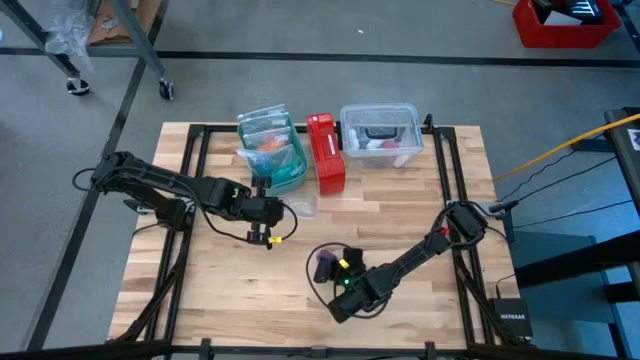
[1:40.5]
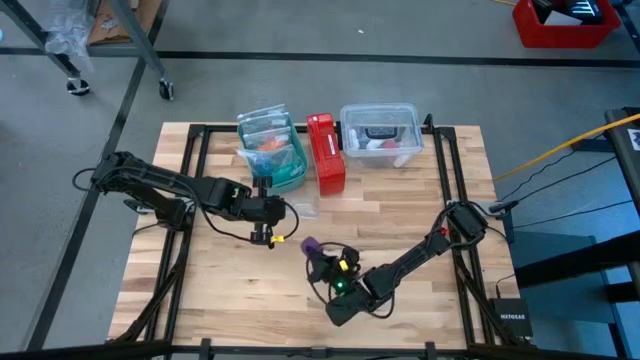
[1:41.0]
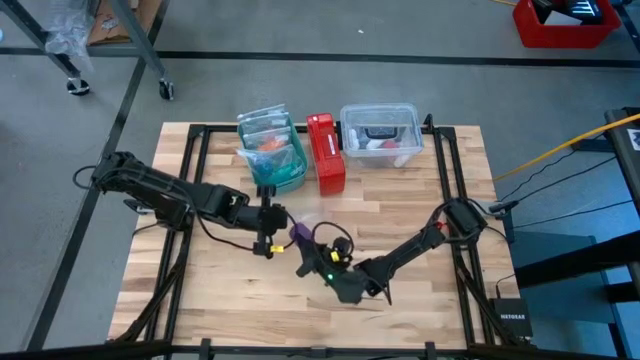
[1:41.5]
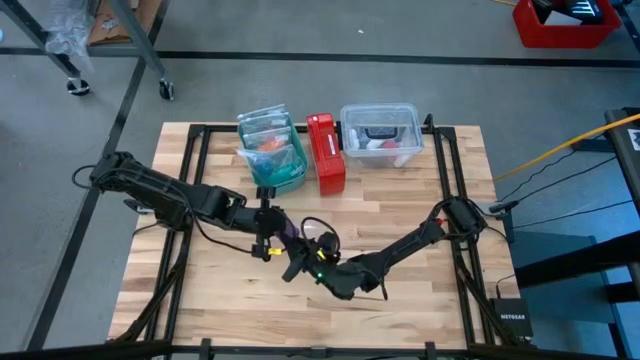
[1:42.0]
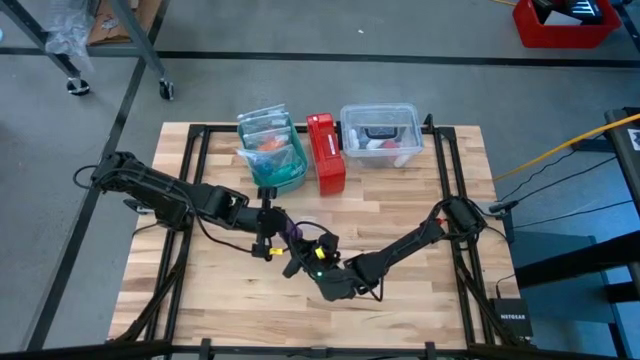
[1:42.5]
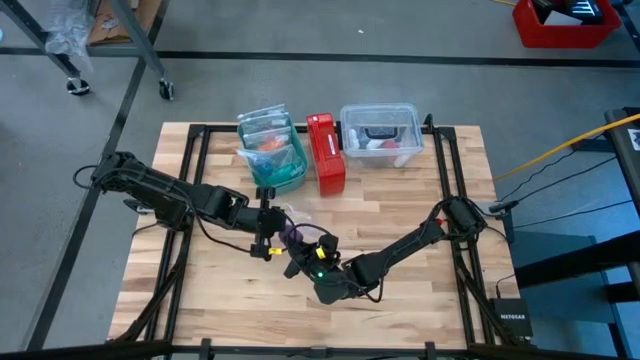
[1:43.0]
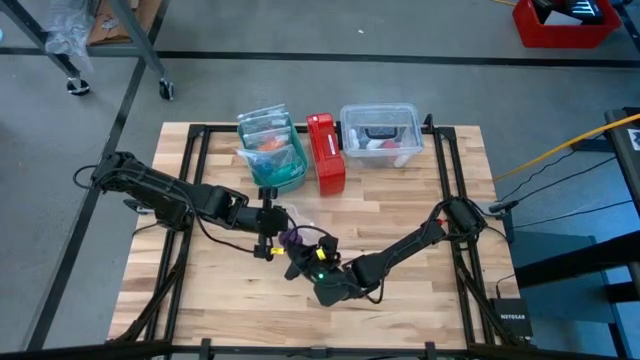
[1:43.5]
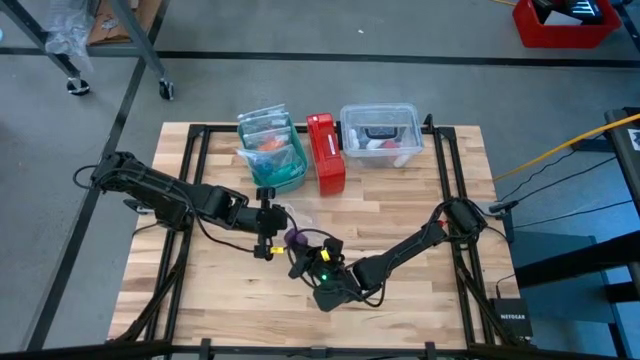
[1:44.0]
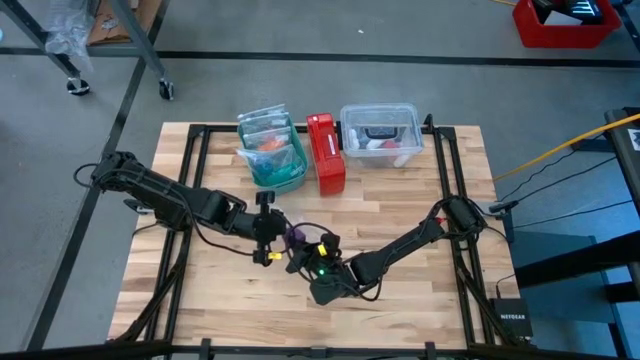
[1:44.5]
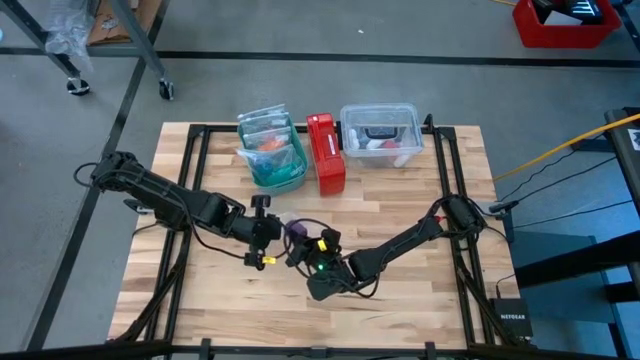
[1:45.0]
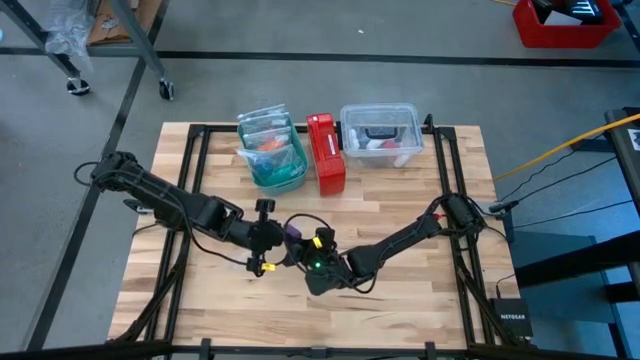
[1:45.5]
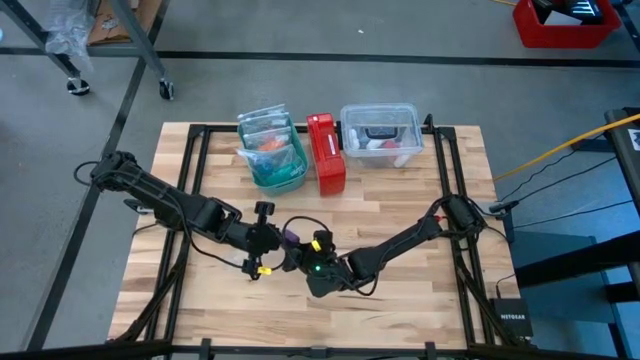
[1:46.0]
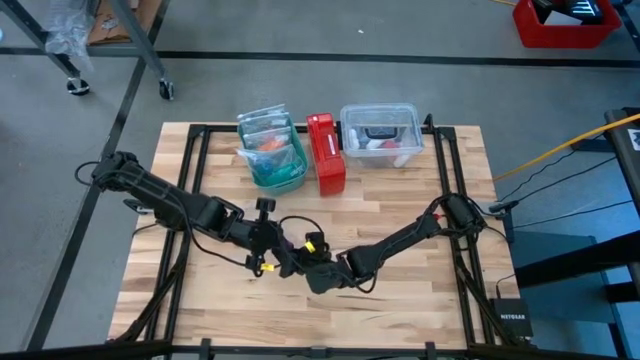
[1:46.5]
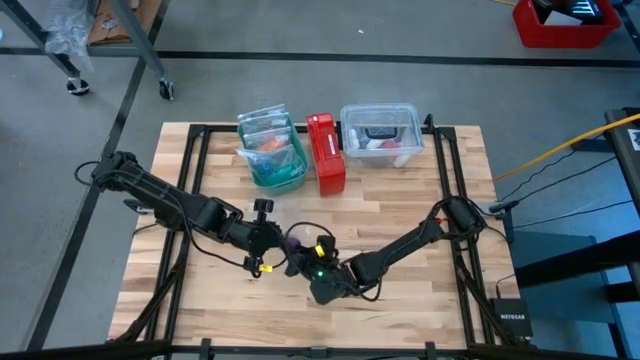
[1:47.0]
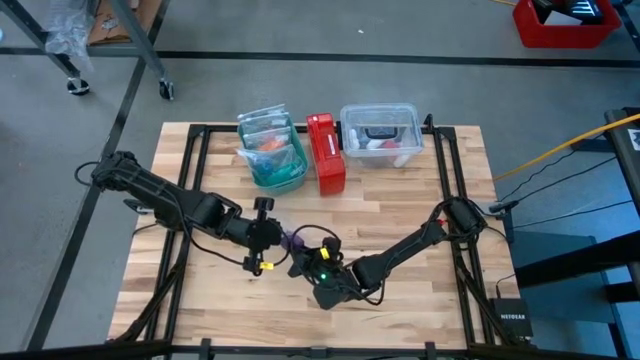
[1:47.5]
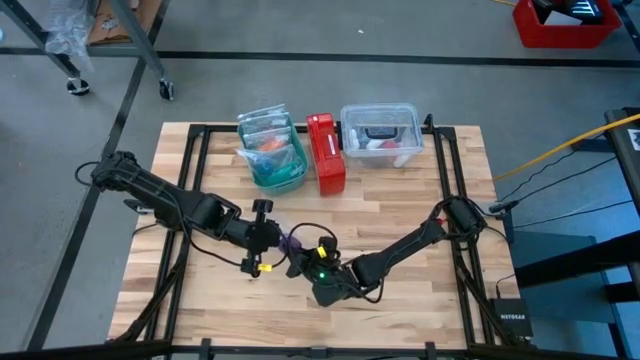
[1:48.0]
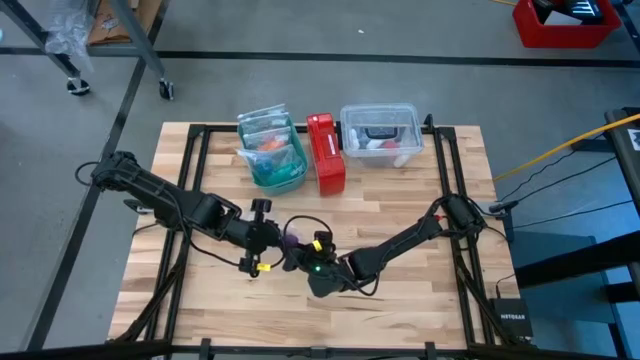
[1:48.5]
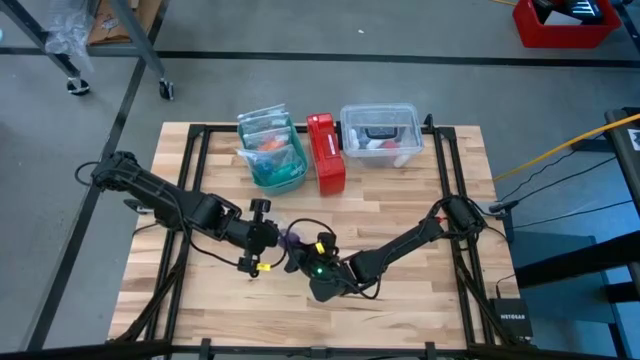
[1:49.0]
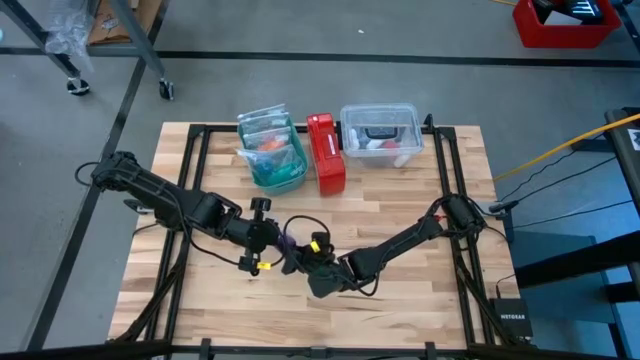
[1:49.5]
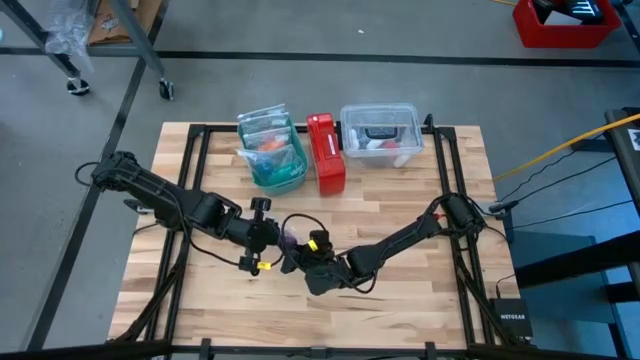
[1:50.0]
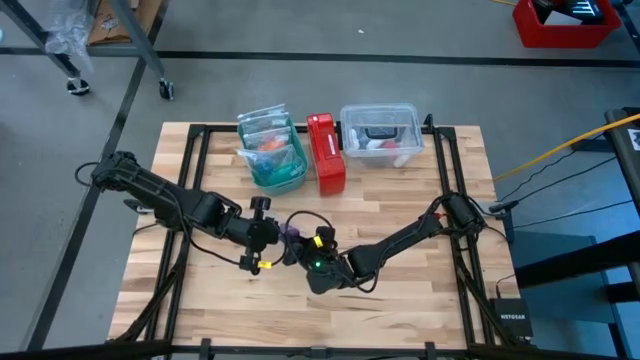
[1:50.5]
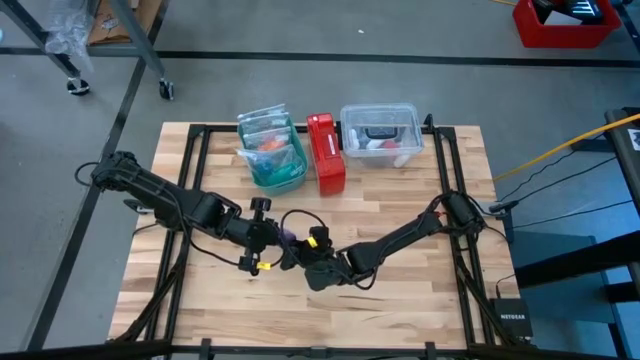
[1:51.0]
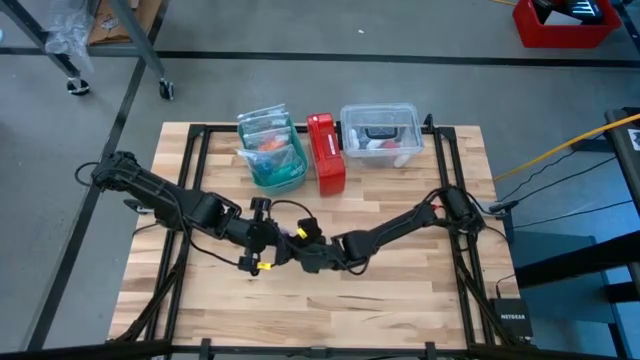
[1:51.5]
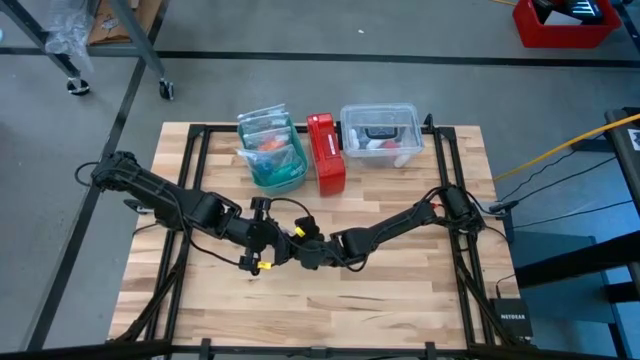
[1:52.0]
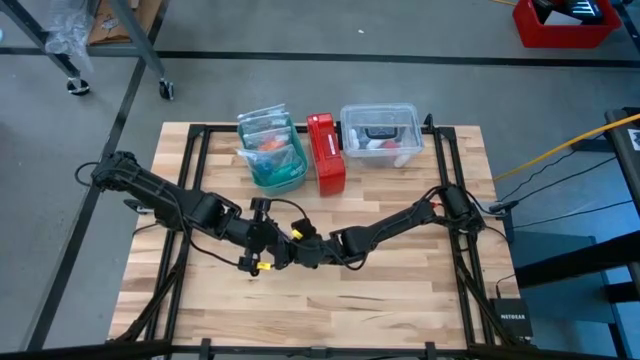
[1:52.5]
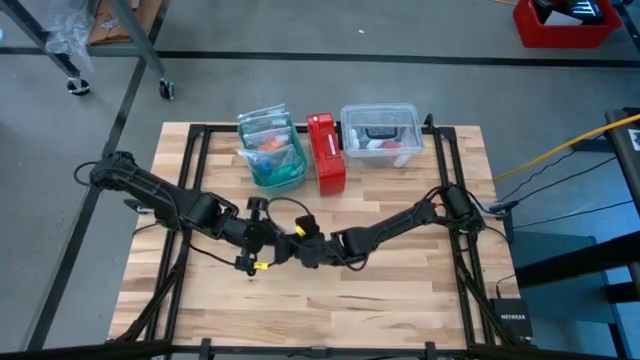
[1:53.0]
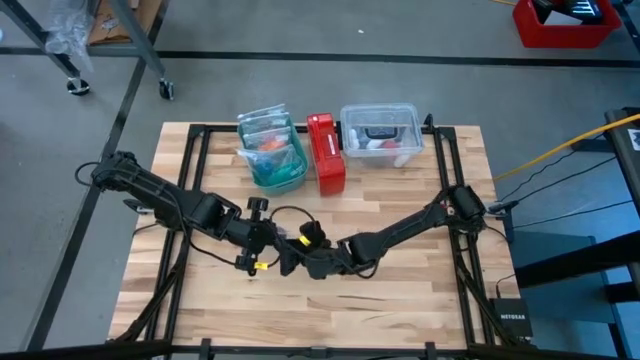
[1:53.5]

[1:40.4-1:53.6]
Task: Roll bandage
Put the purple bandage into the transparent zip bag

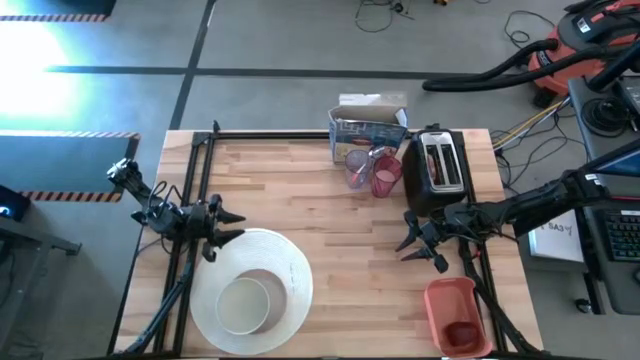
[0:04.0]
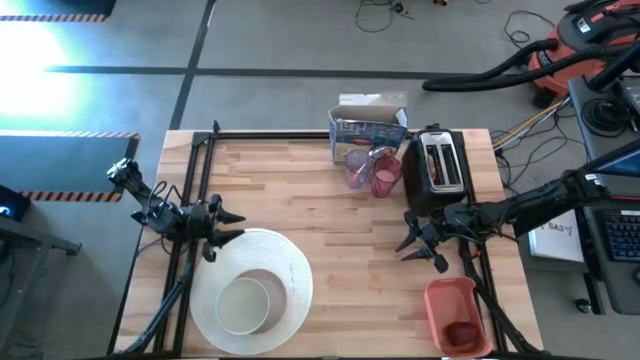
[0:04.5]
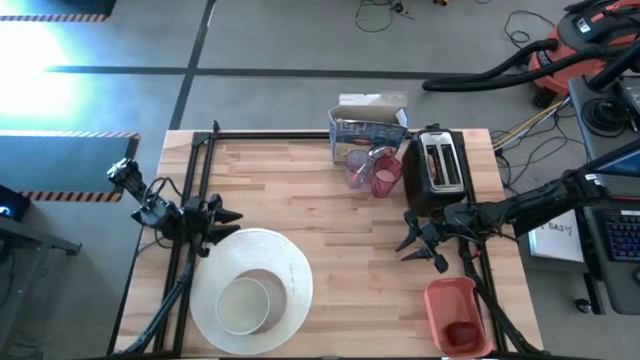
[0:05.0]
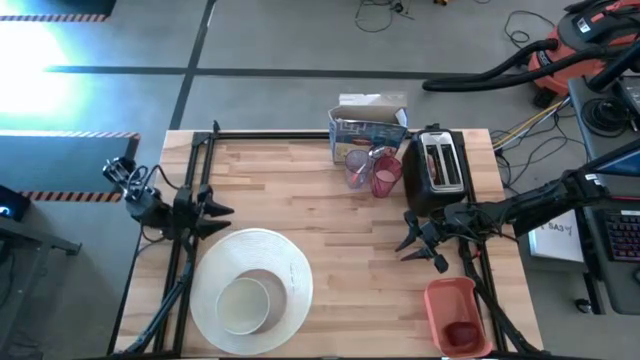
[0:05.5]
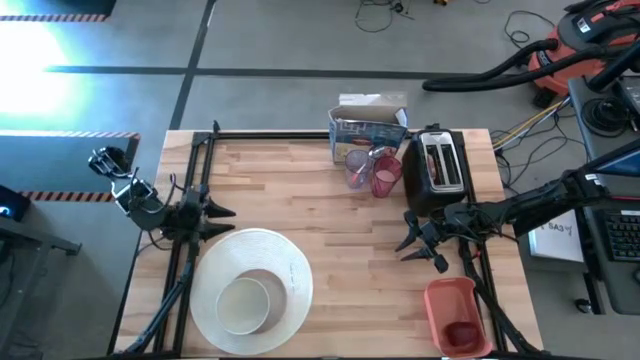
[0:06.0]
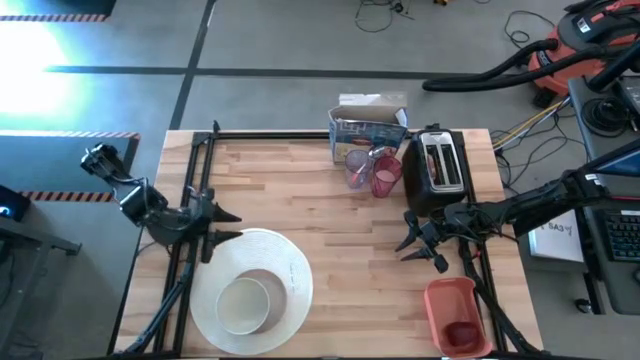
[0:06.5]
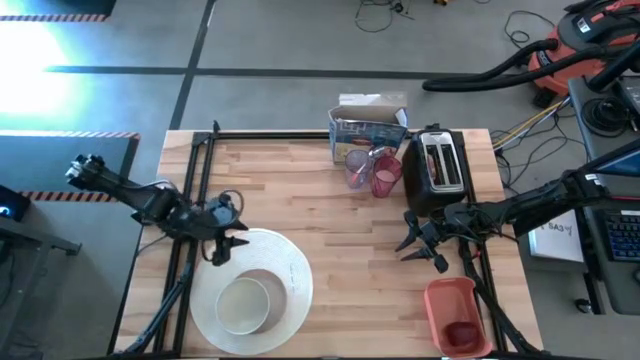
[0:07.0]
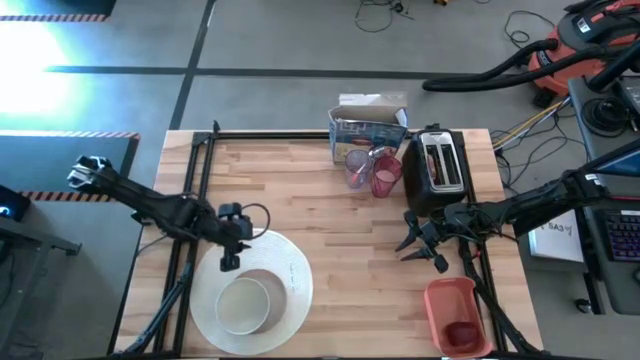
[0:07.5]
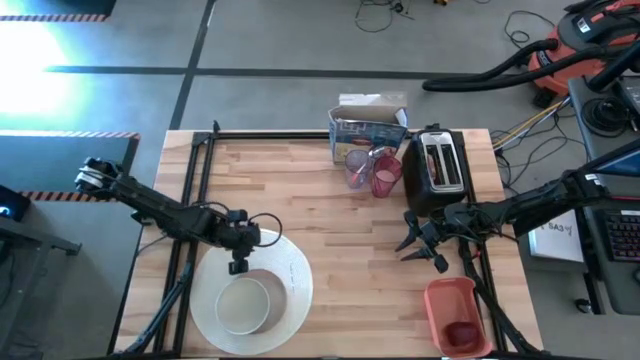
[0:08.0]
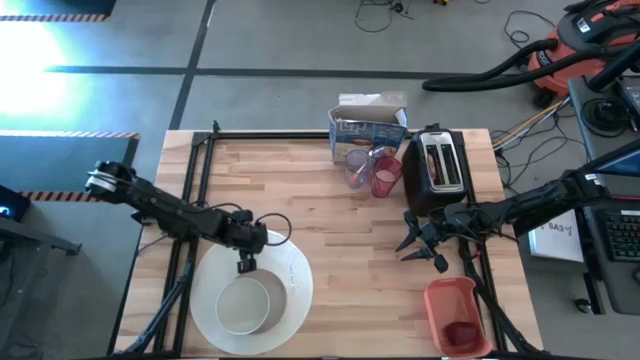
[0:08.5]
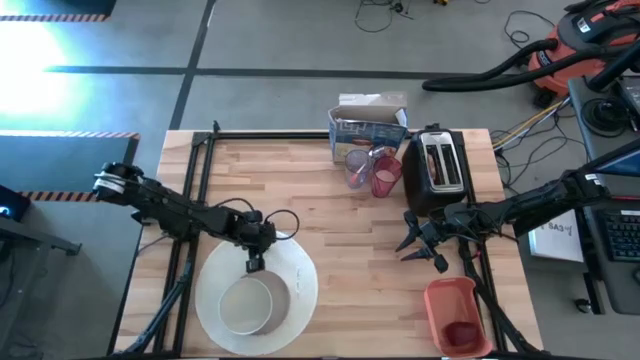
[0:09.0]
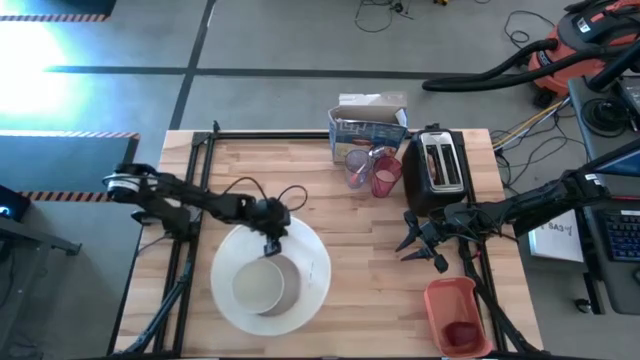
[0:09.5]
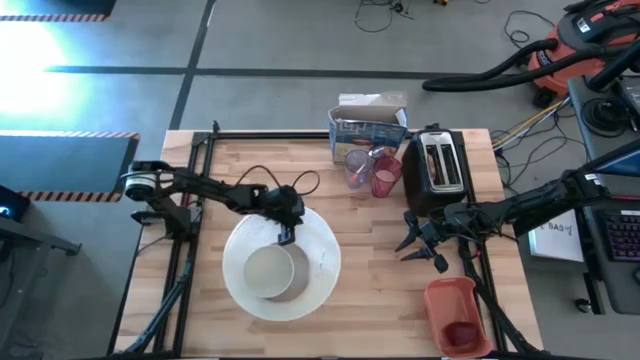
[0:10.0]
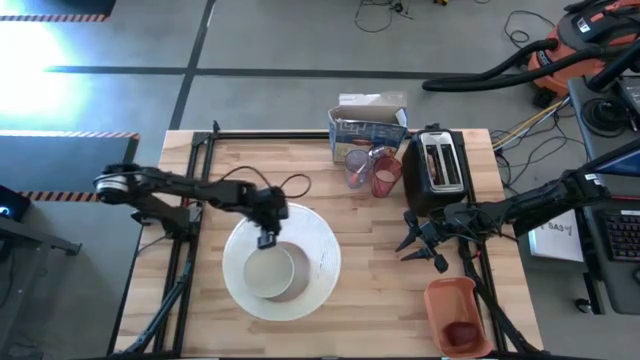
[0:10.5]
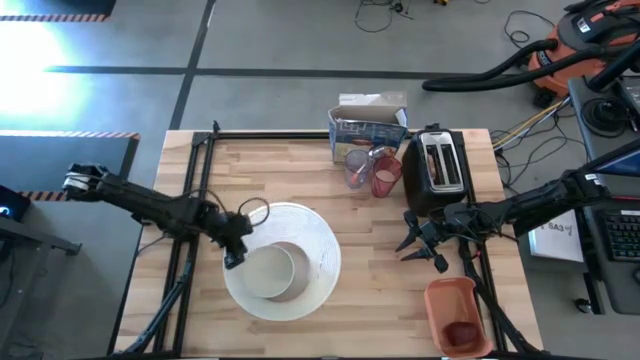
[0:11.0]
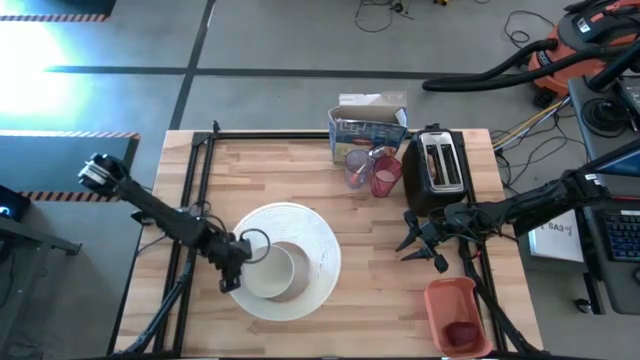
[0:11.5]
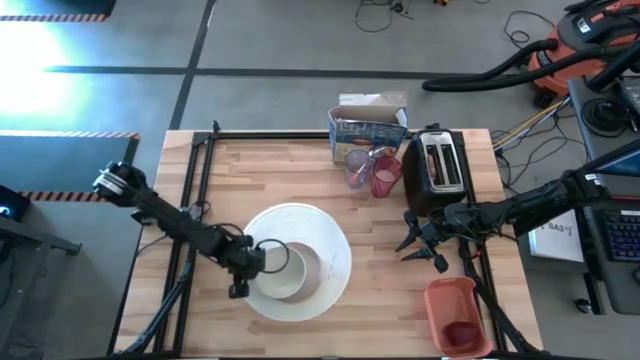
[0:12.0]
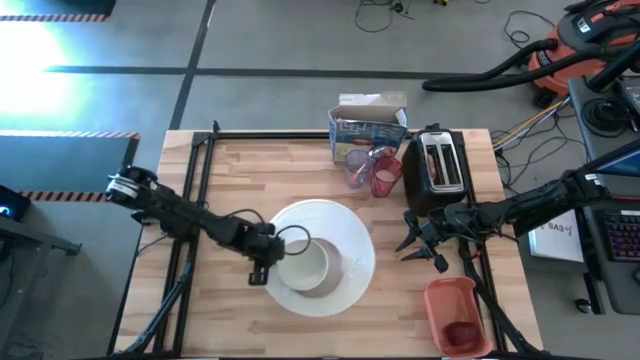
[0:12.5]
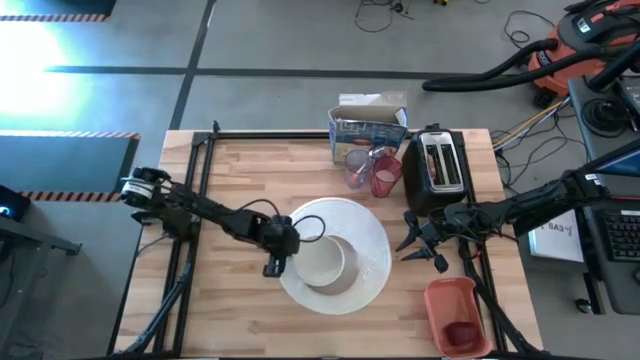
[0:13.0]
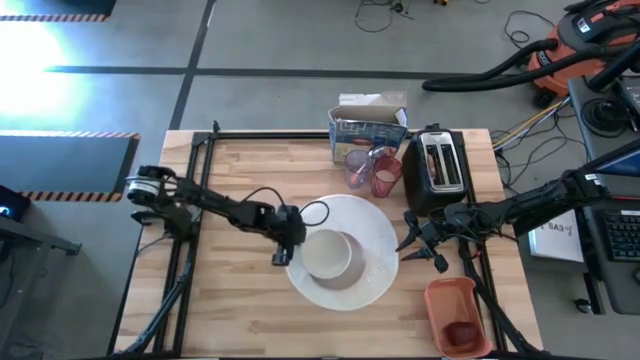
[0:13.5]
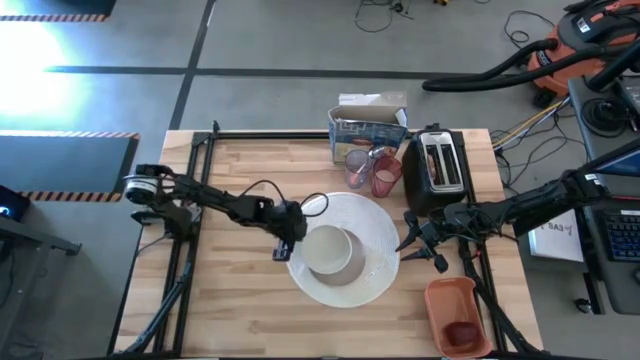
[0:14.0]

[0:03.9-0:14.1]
Task: Arrange a breakfast setting
Move the white placemat to the center of the table
